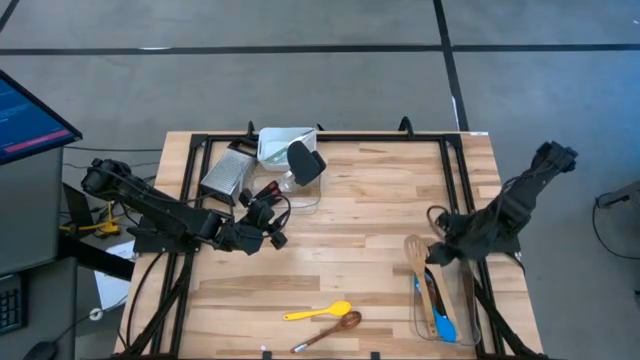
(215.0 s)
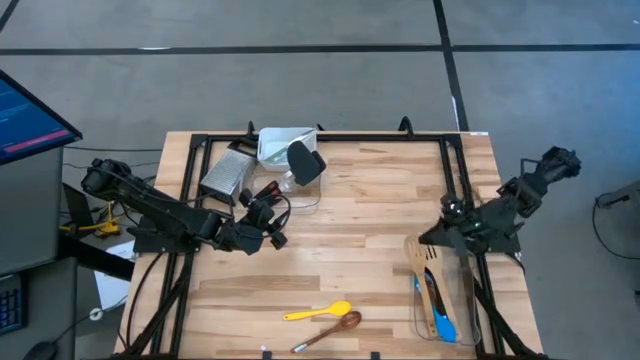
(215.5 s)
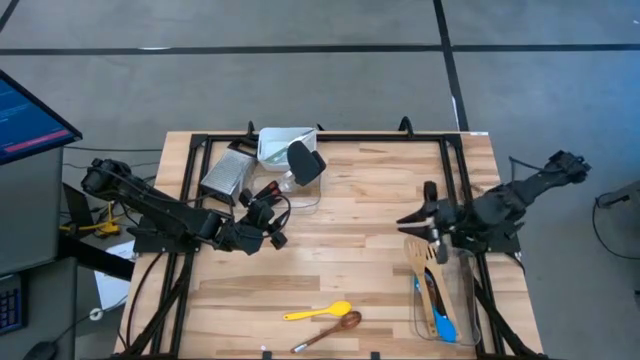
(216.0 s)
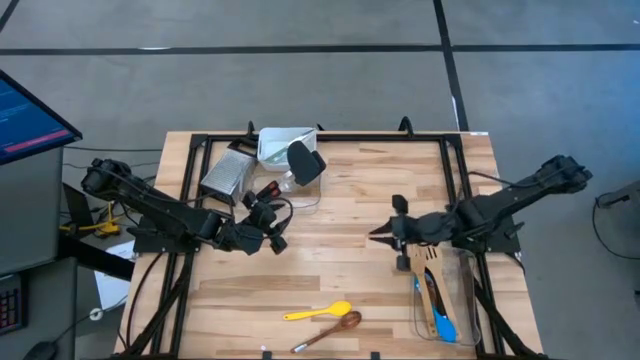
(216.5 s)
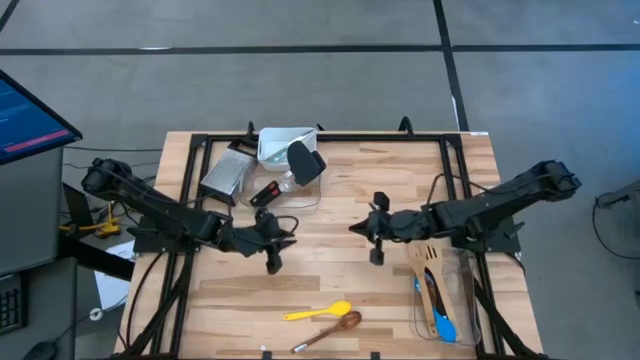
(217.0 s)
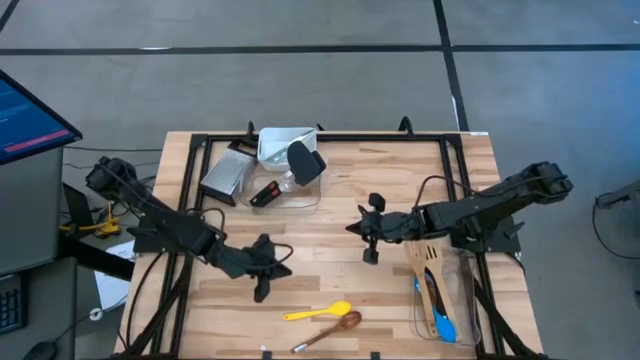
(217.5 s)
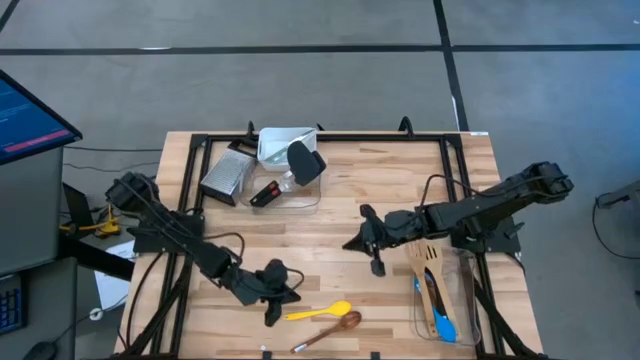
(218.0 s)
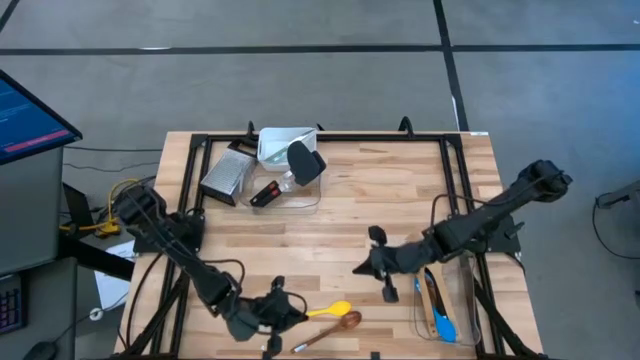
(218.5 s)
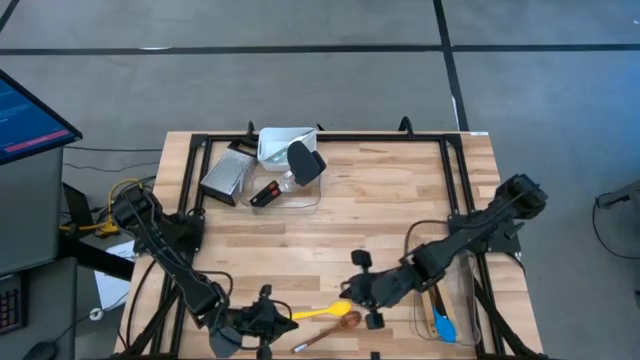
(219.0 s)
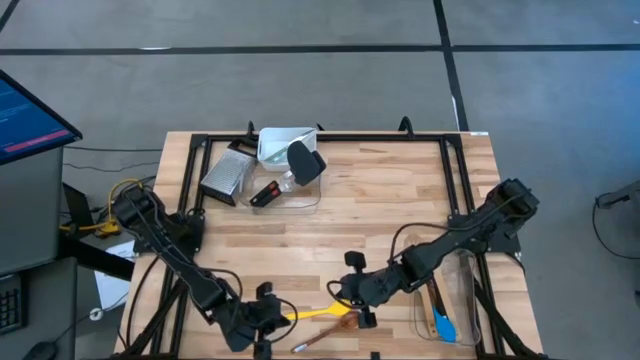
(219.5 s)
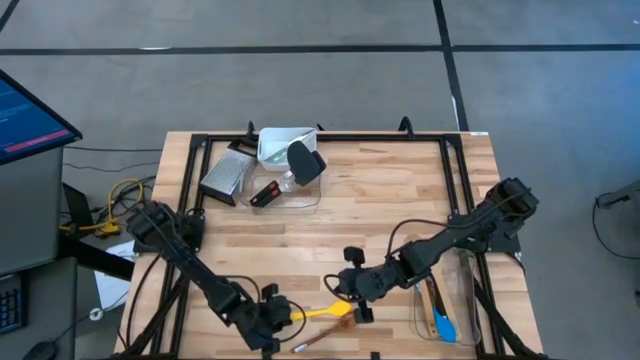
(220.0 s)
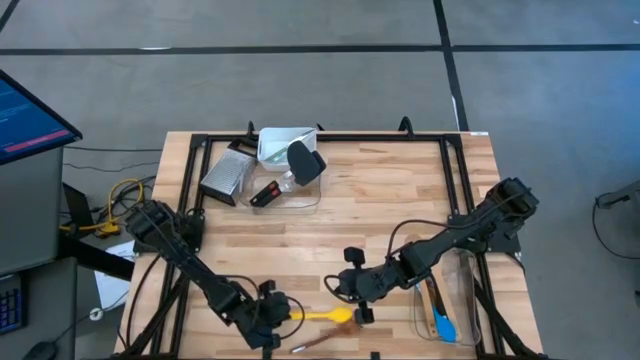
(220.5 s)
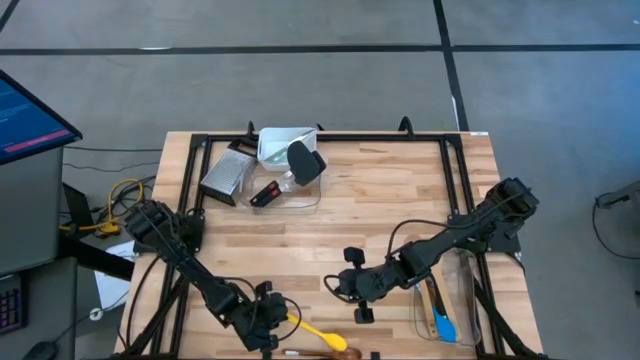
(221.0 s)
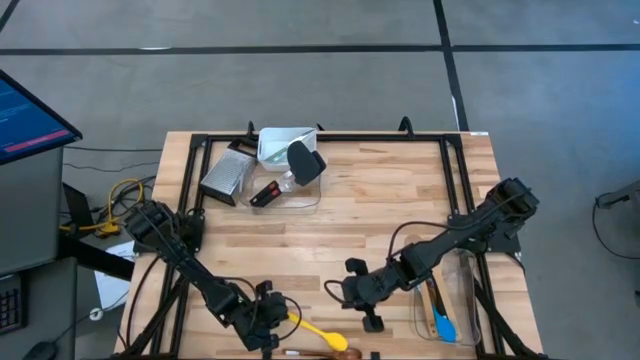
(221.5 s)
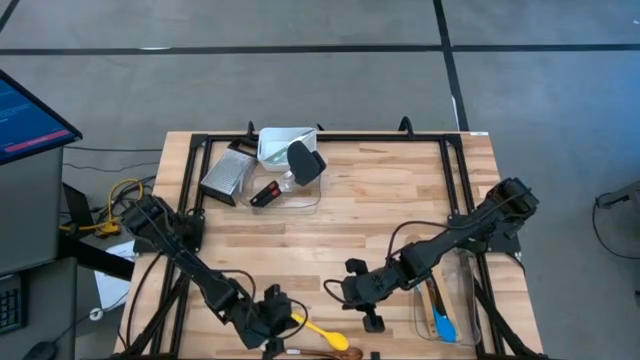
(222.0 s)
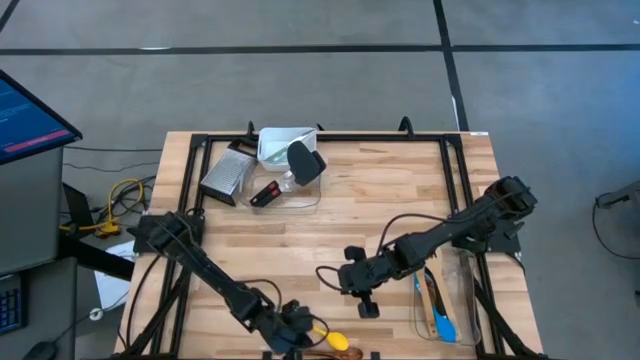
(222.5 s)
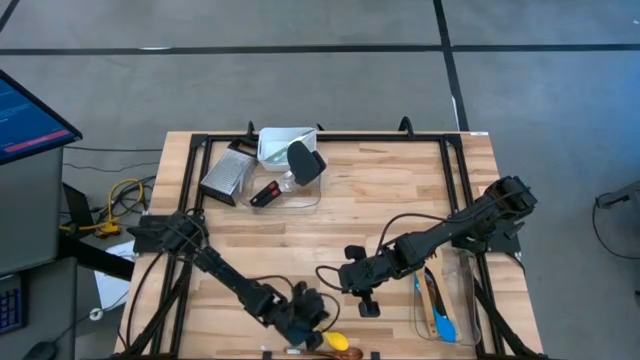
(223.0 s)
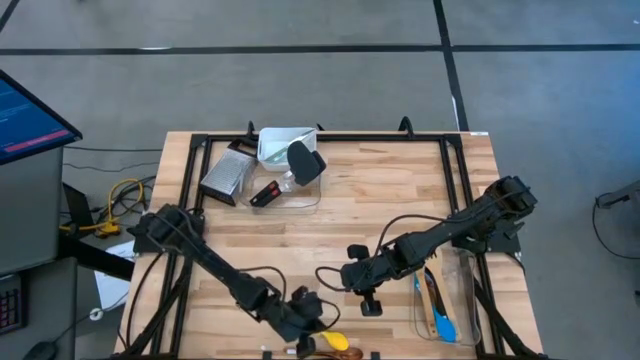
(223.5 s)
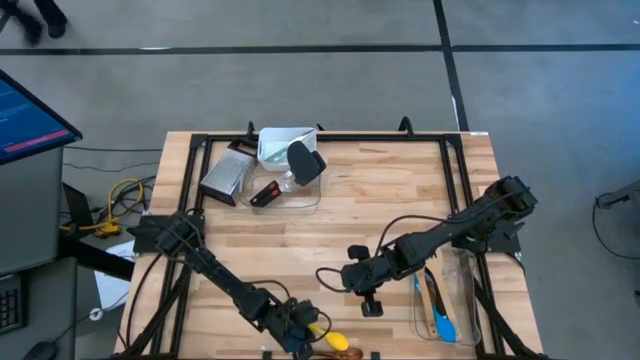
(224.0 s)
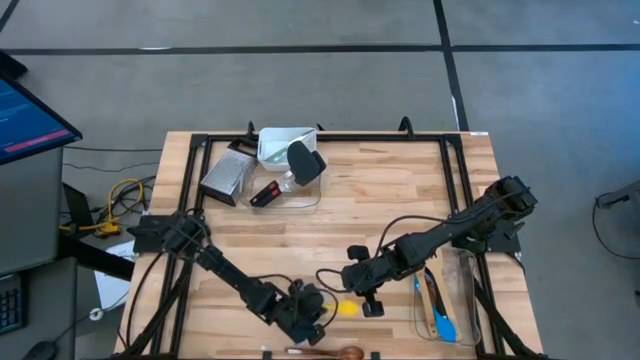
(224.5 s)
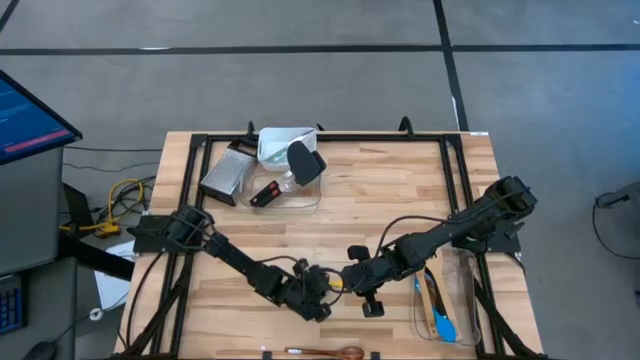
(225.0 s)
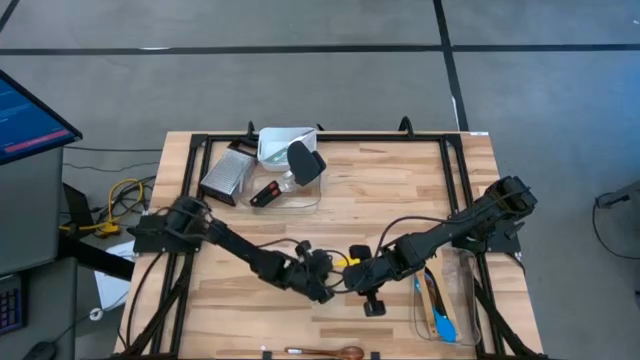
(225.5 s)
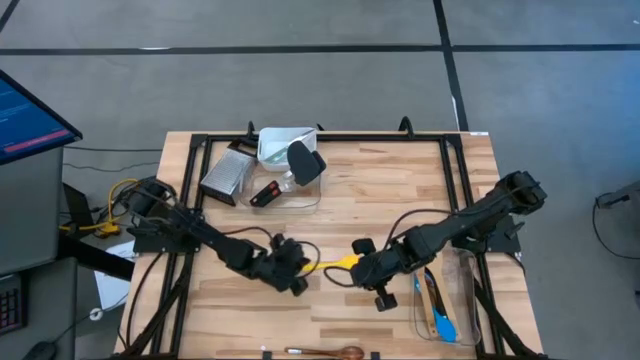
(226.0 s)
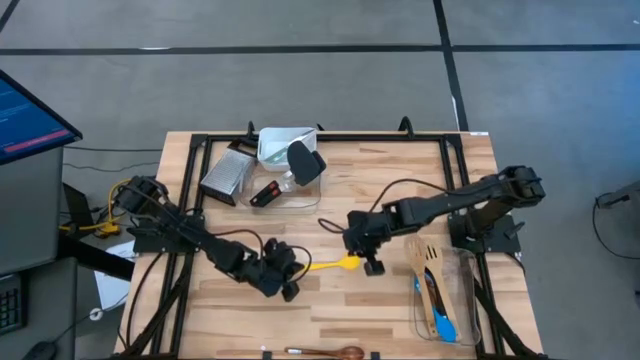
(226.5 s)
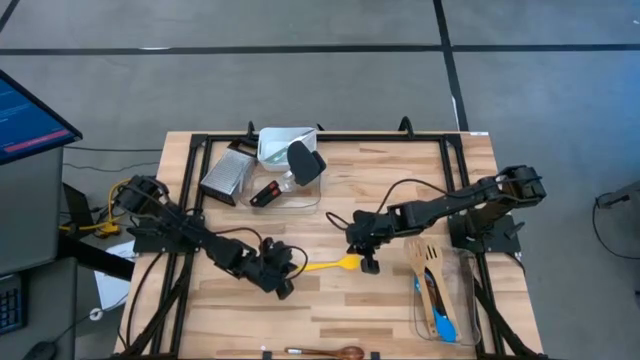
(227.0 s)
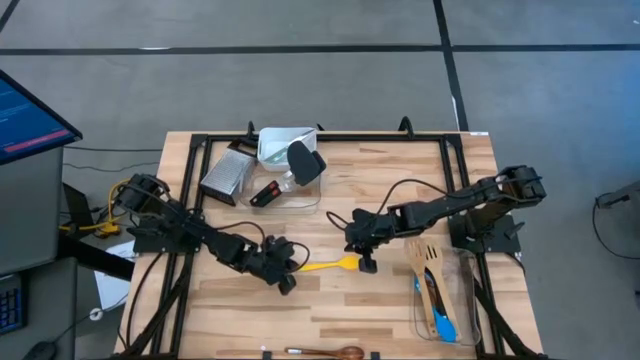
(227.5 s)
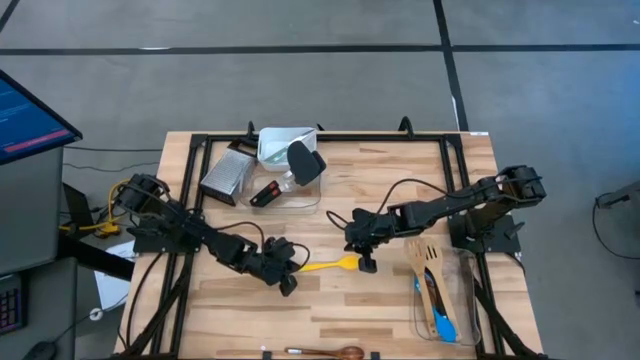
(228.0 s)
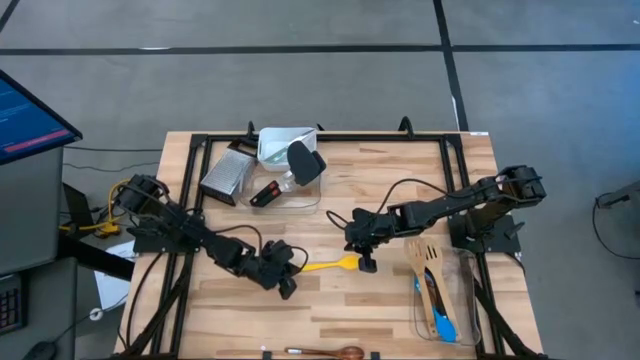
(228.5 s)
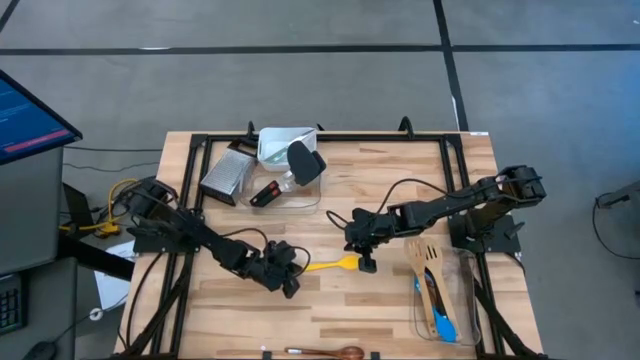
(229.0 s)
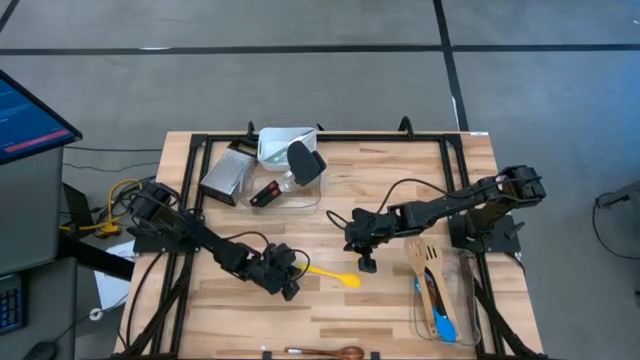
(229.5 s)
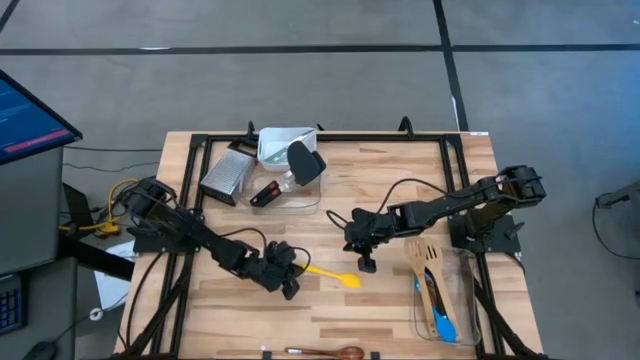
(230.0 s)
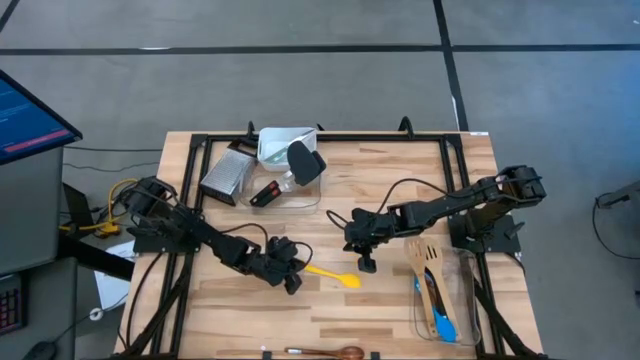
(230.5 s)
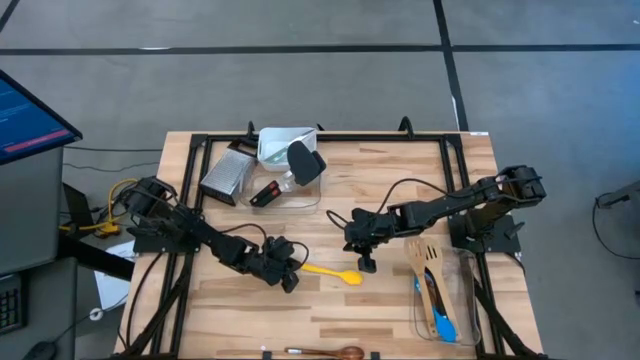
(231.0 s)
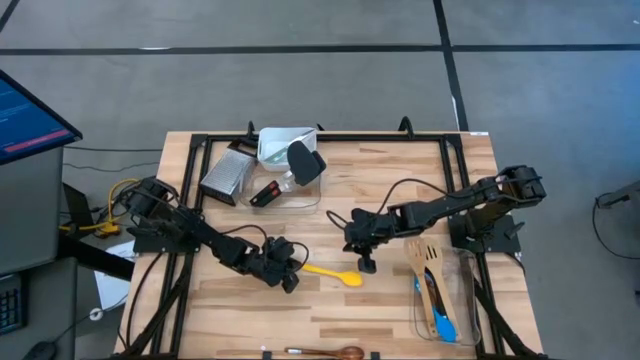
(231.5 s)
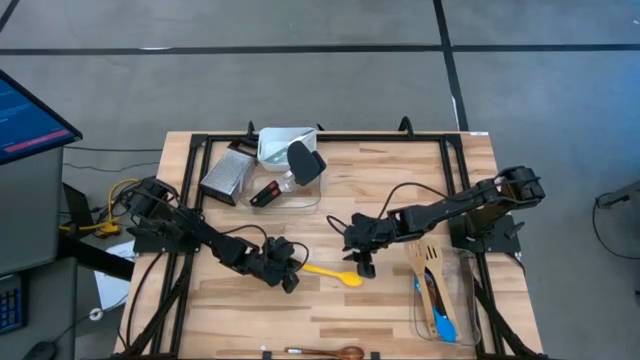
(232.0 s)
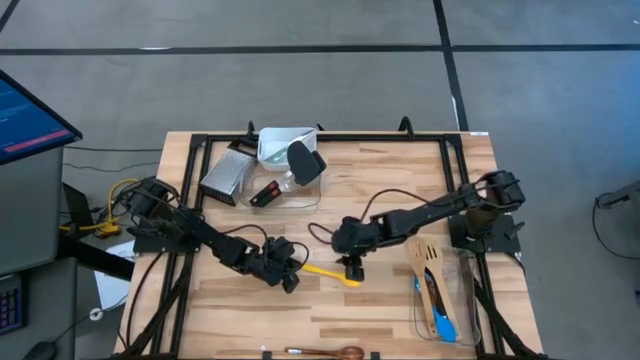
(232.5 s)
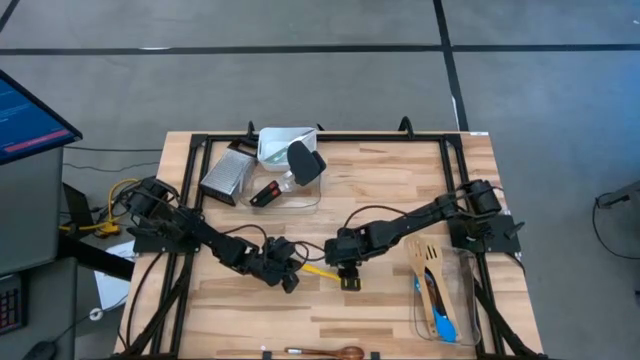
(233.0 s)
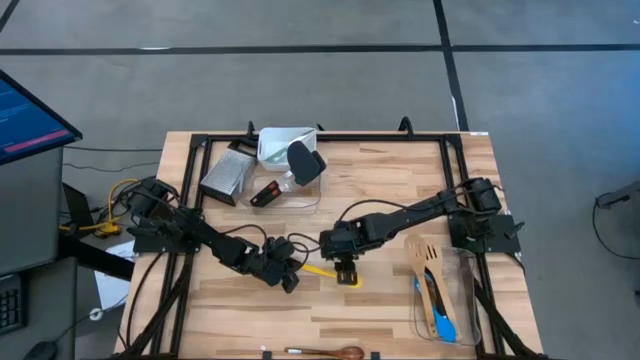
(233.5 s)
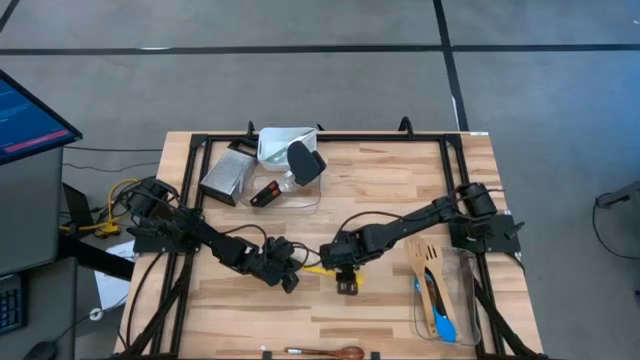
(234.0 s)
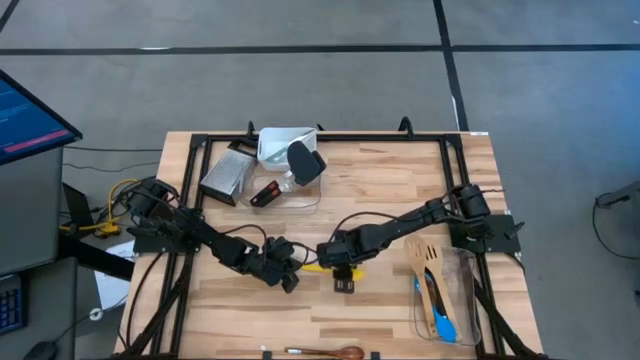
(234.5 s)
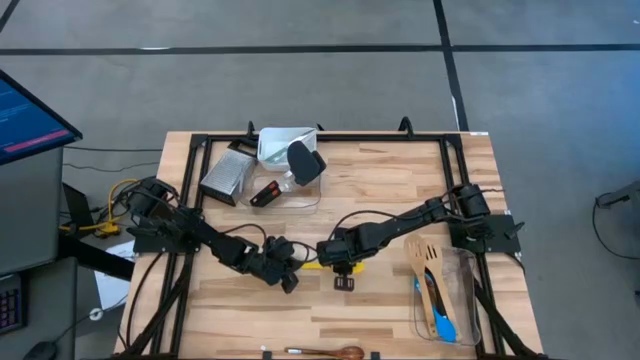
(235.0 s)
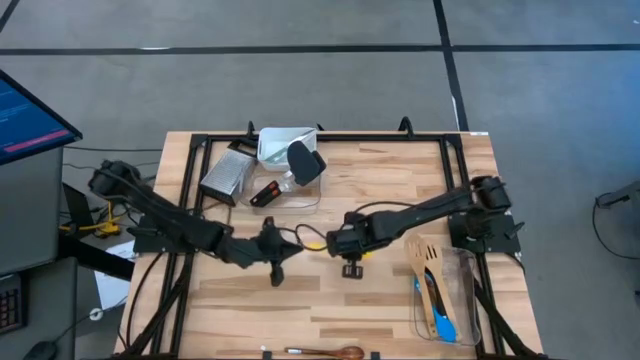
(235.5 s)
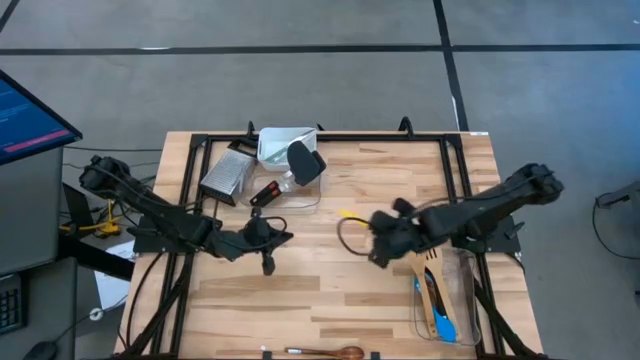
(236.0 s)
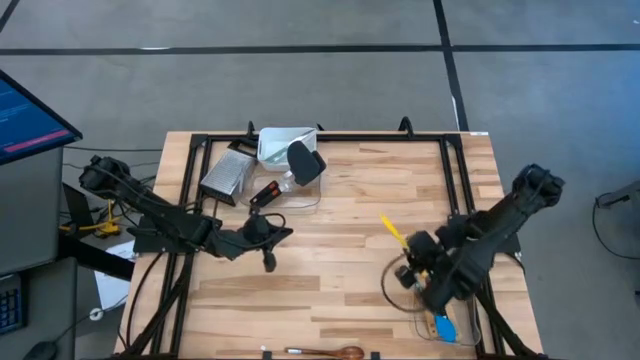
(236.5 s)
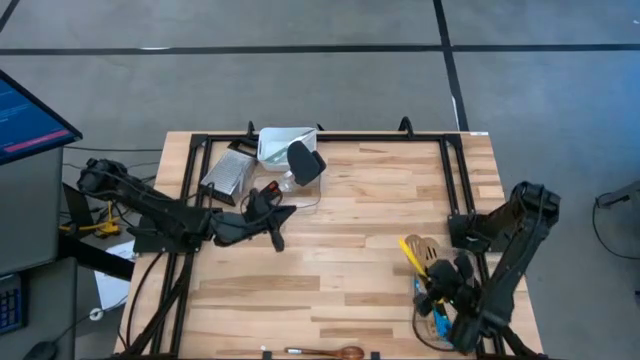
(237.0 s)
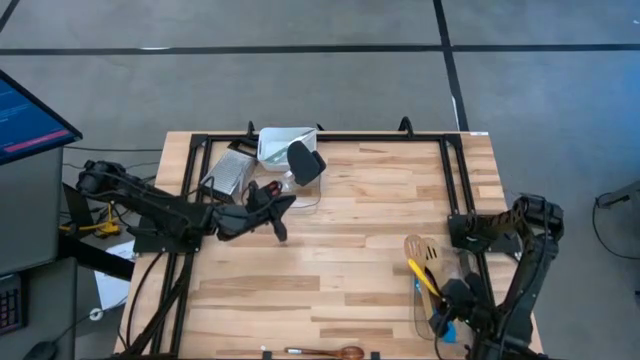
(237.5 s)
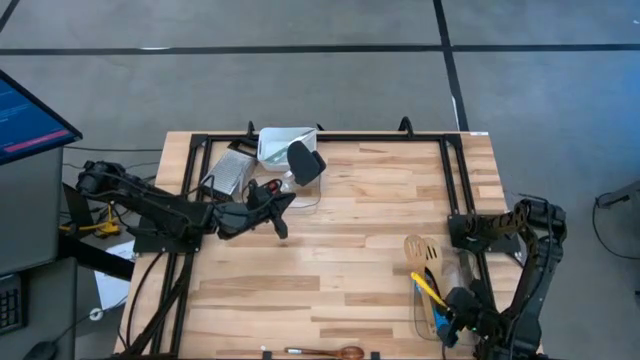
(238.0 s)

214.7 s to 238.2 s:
Task: Pick & Place Kitchen Items
Put the yellow spoon into the bottom transparent bin
